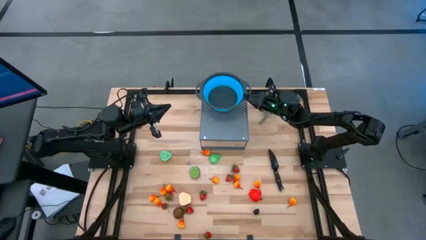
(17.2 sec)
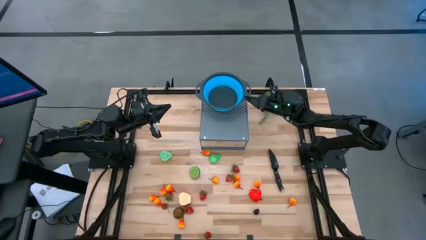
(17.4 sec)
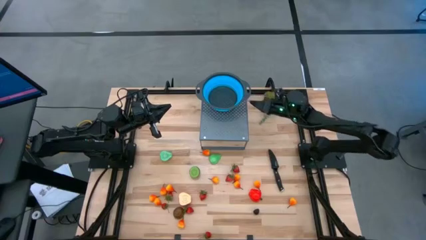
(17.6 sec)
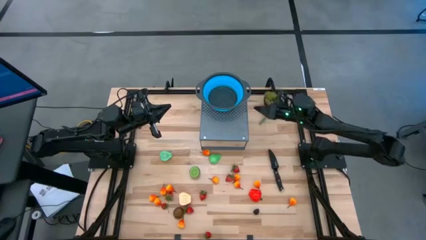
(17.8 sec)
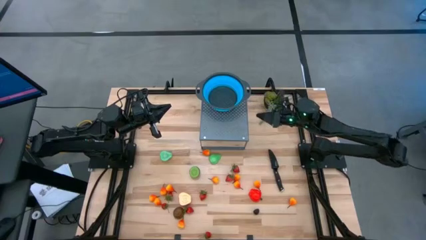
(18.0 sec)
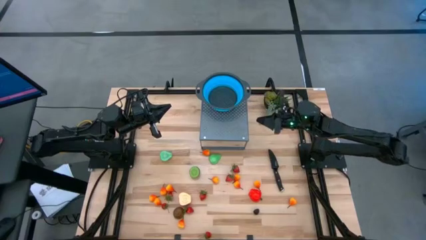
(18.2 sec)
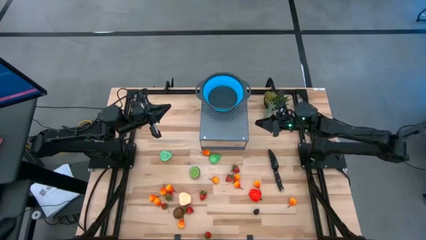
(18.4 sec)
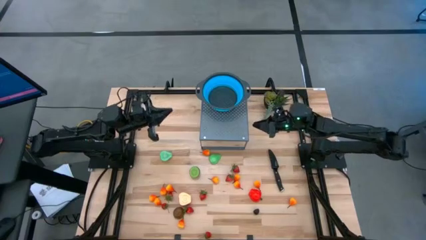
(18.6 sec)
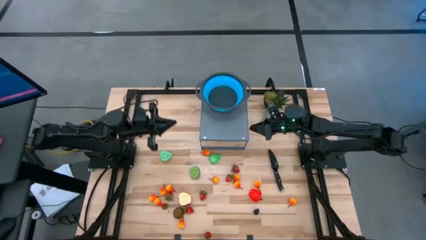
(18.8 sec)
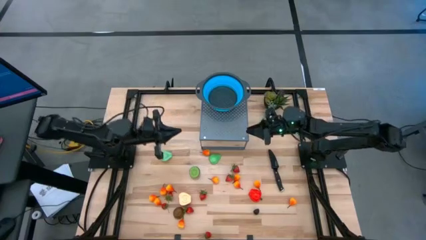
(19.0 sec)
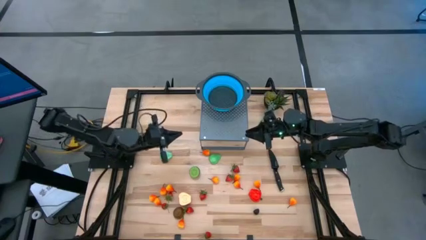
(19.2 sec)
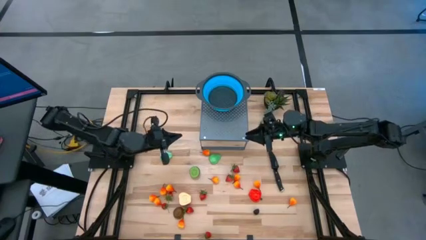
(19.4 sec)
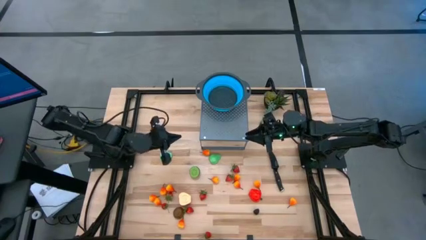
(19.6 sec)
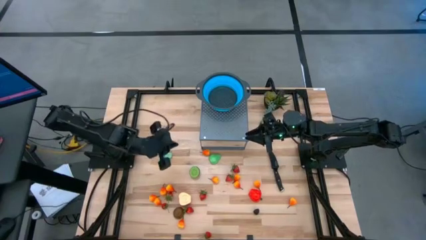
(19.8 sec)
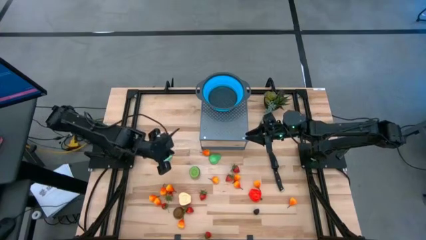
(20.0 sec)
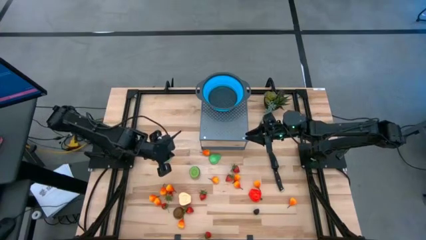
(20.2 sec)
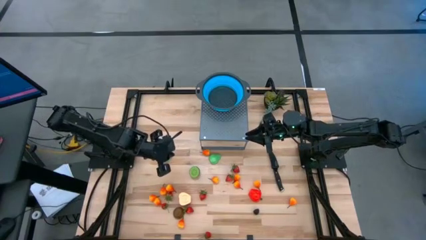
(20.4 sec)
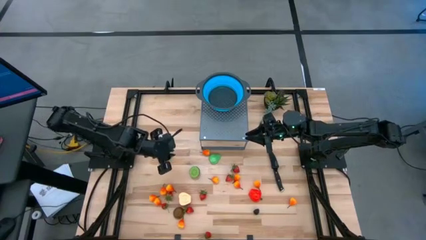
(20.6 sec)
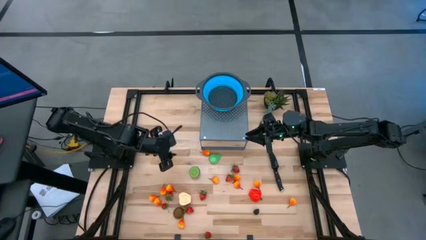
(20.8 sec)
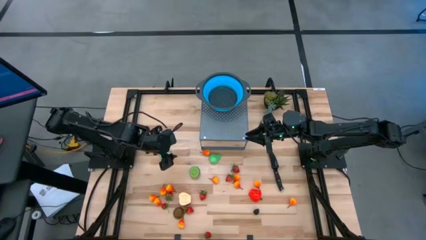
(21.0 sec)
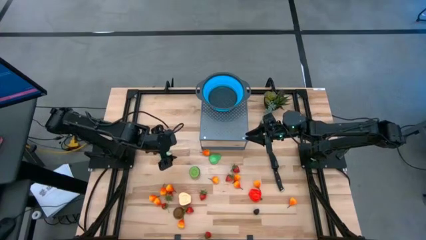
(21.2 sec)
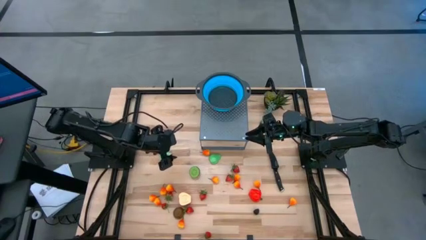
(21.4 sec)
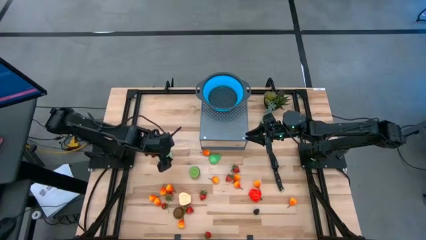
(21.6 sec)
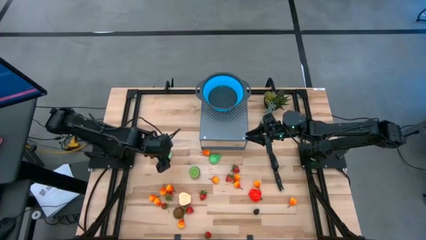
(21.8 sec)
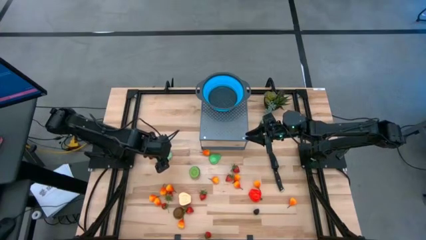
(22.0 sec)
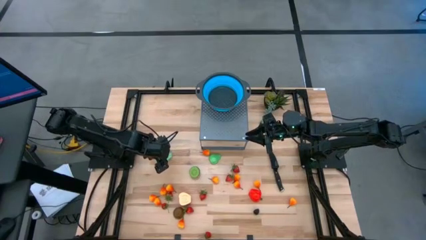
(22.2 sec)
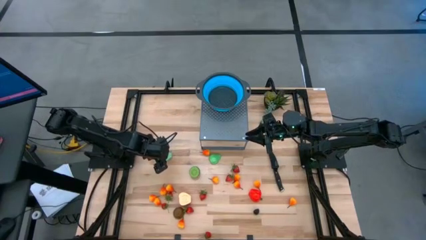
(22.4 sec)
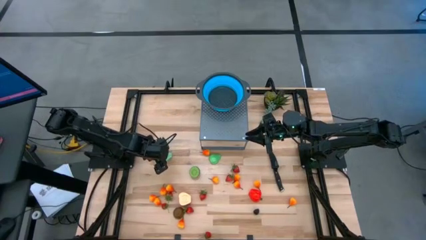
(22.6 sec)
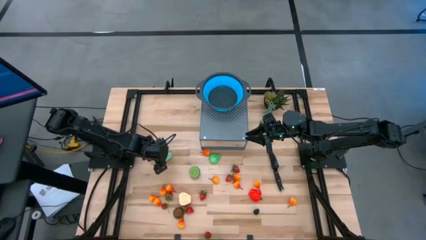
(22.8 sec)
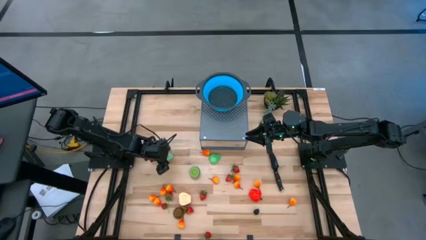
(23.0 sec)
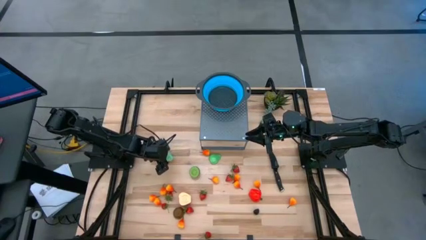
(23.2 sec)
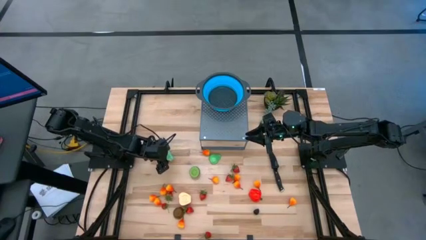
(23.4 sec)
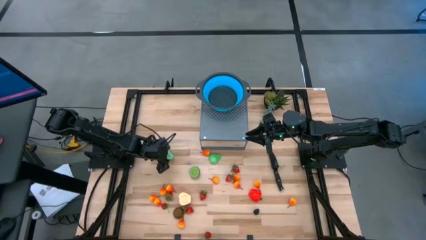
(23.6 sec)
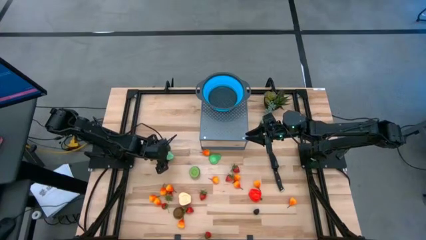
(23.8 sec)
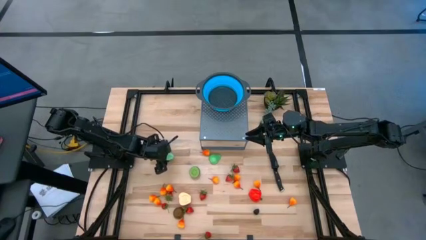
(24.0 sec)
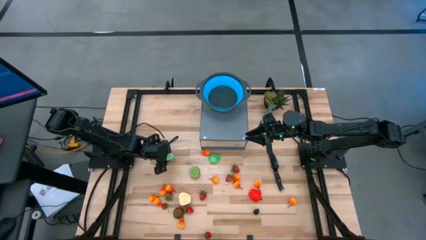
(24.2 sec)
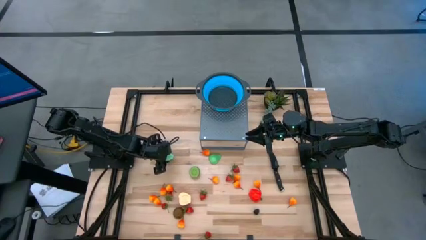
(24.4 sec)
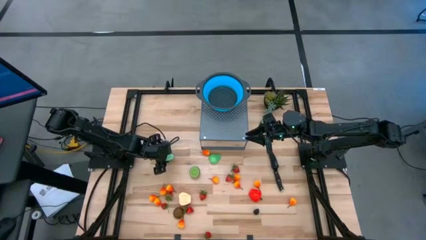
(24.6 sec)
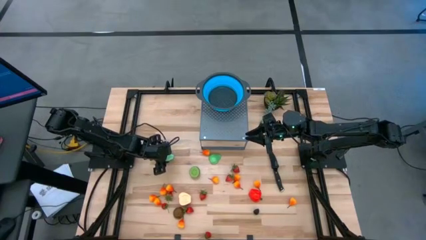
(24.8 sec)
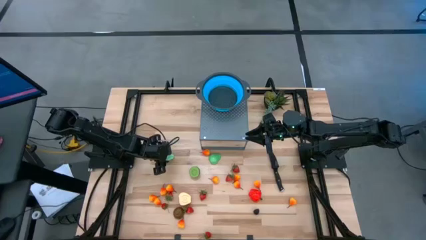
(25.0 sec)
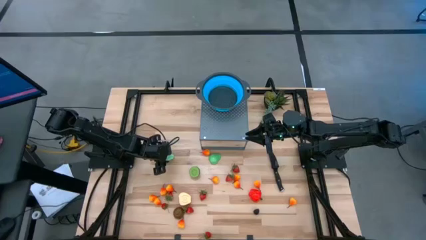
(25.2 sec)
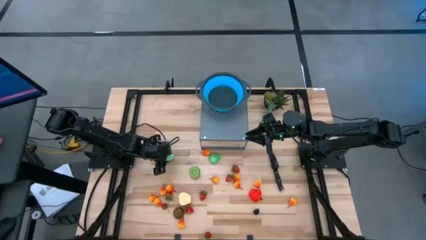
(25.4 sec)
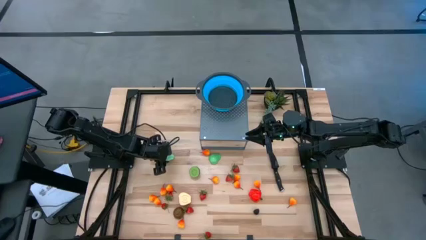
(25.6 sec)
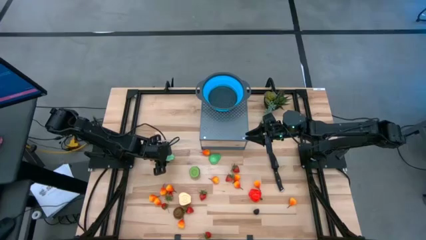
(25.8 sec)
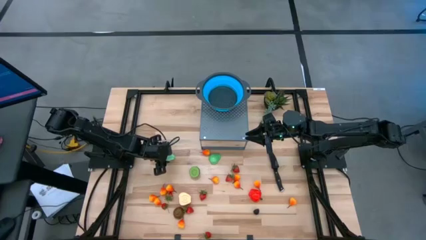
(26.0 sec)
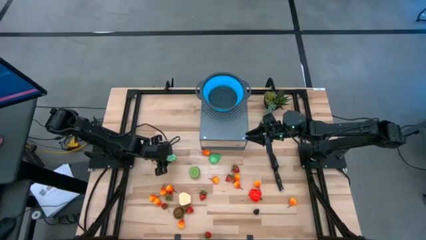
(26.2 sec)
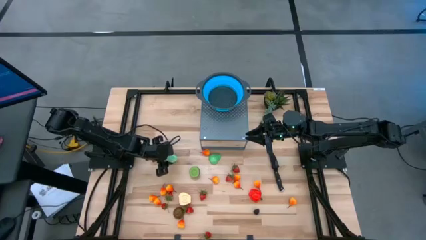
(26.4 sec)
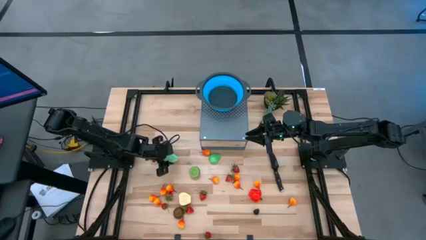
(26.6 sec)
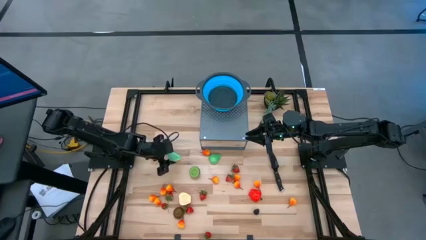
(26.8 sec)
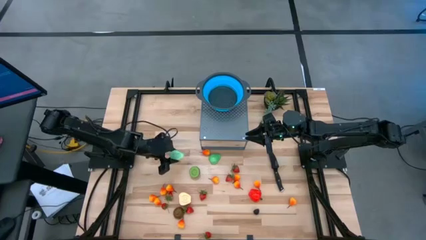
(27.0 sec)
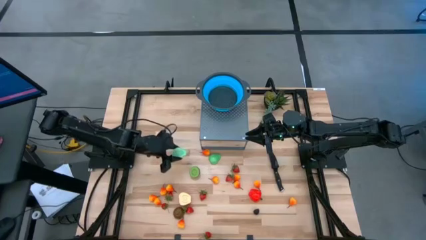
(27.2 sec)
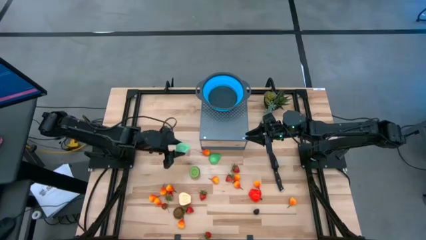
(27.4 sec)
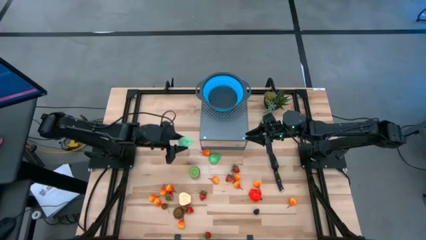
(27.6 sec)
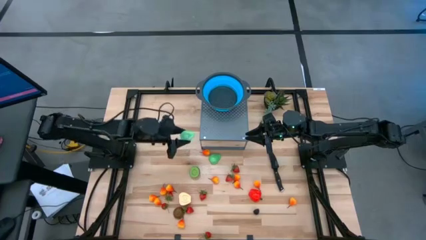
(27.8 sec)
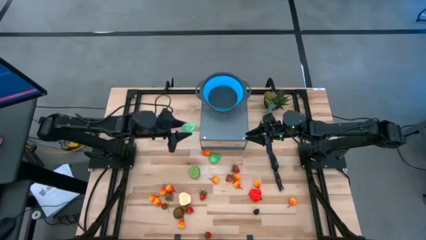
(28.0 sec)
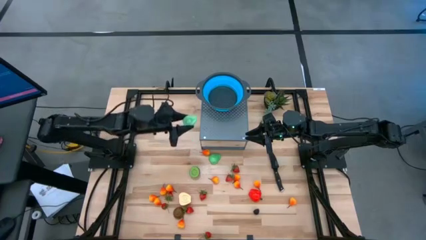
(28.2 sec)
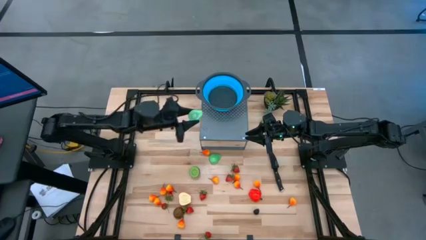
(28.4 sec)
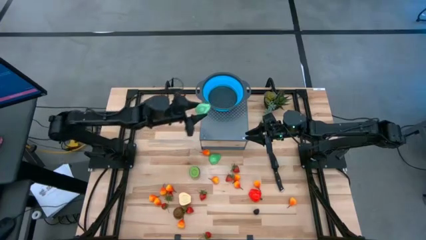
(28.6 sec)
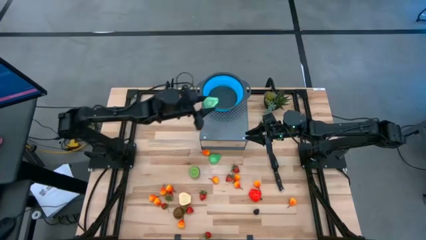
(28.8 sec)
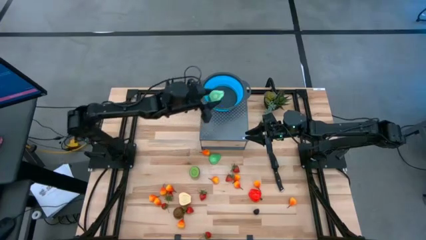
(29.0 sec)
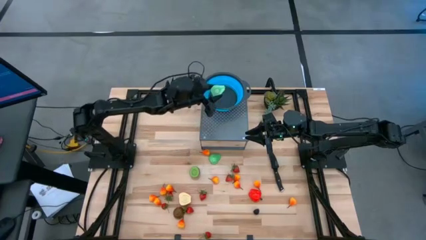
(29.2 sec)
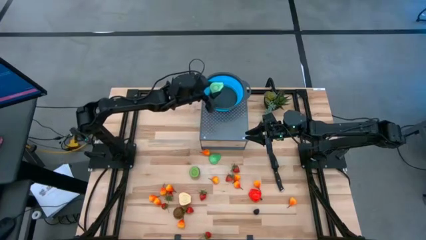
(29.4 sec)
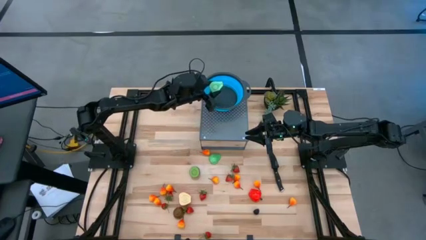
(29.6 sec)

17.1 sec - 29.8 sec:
Task: Pick & Place Fruit
Put the left sliced pear into the strainer bowl

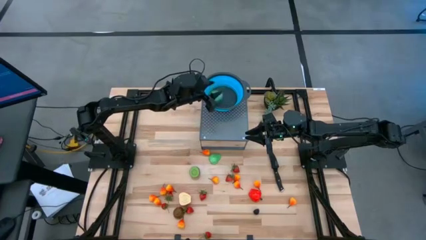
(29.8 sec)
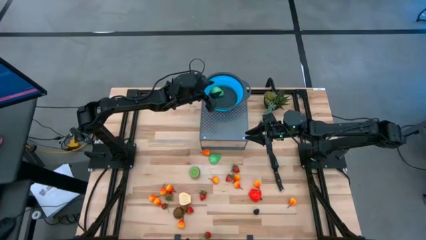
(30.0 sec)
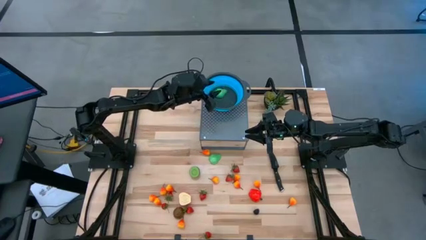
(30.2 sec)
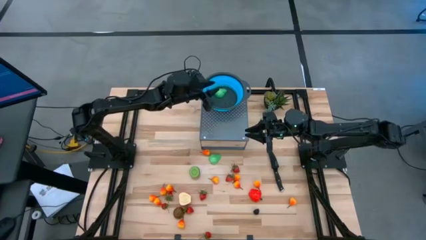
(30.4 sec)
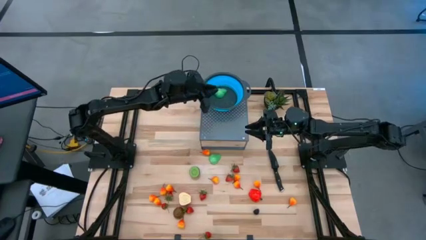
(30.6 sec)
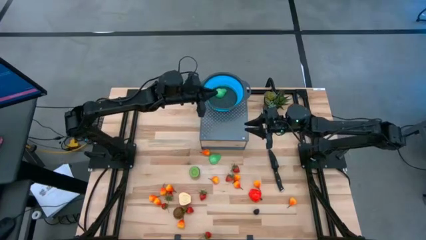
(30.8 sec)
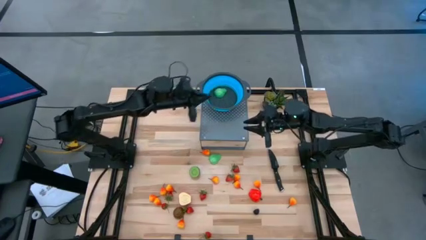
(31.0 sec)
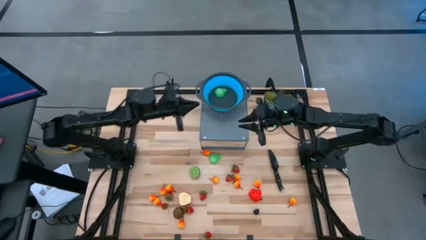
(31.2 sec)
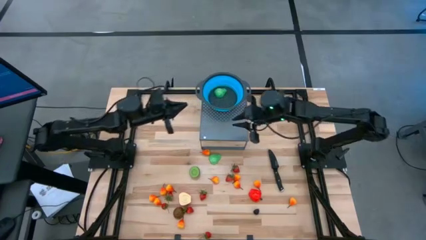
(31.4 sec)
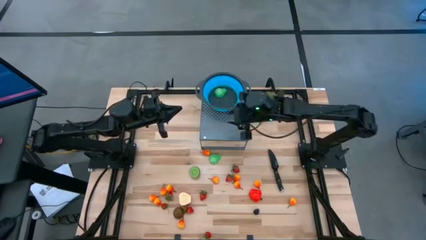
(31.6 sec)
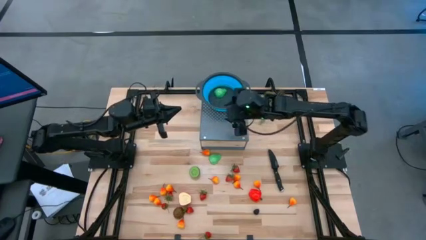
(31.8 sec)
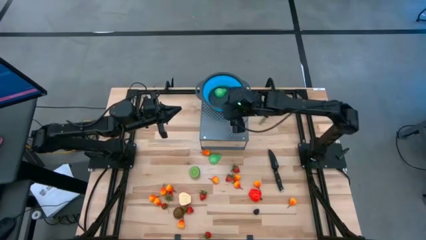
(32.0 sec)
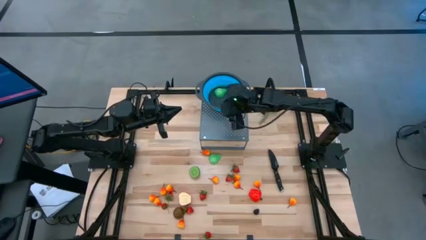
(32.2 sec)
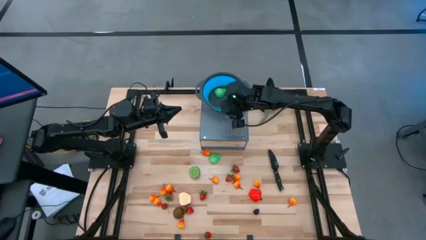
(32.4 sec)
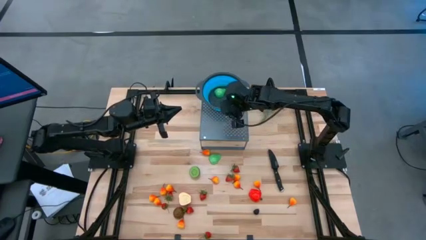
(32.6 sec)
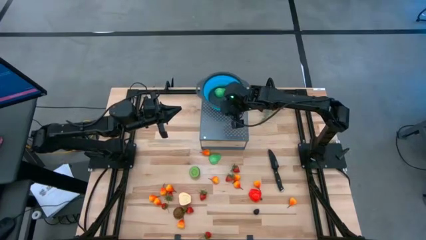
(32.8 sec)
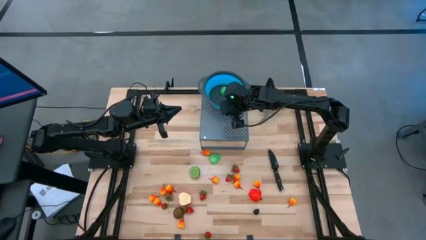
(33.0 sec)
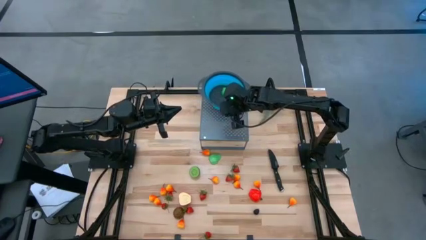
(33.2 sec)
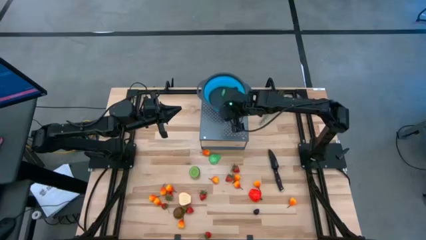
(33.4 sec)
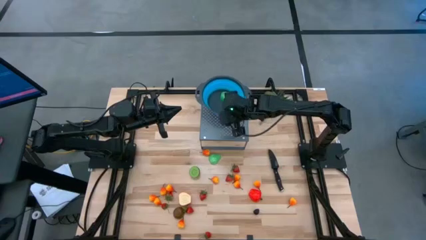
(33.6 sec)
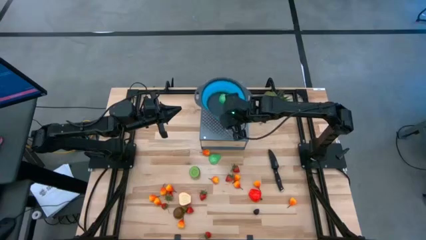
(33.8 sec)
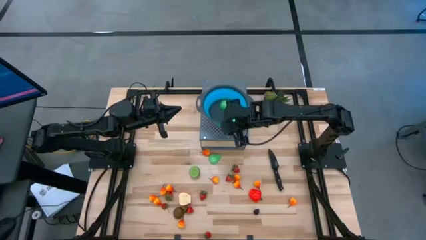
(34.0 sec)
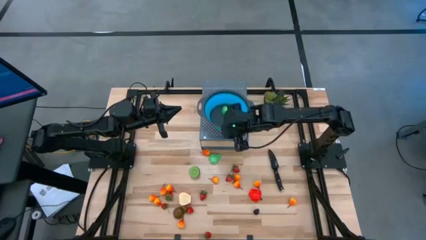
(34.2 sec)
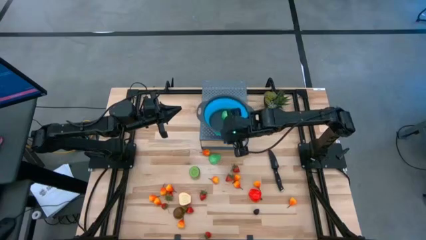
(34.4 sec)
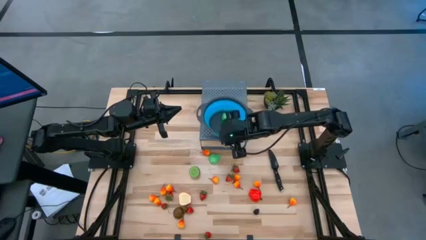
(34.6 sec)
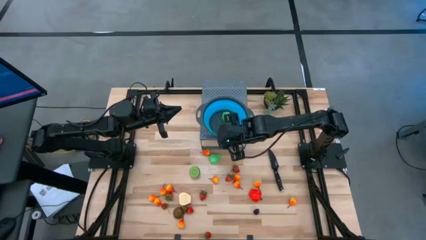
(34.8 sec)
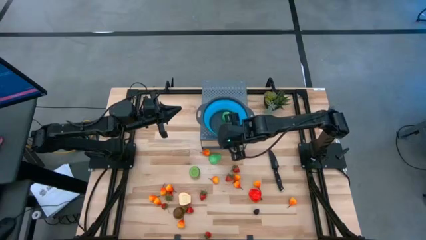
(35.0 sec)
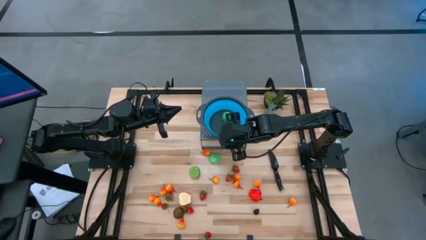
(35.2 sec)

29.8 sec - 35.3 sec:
Adjust the strainer bowl on the shelf
